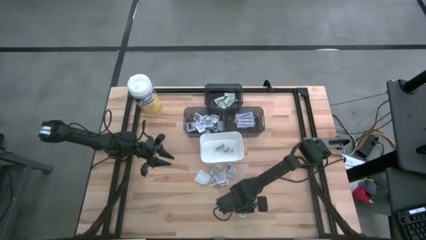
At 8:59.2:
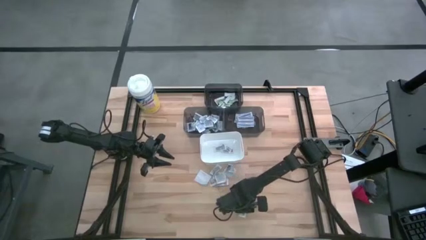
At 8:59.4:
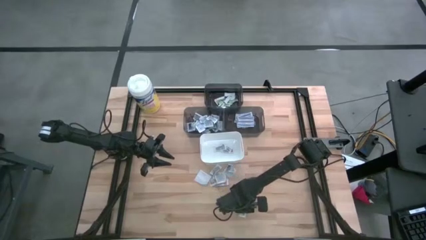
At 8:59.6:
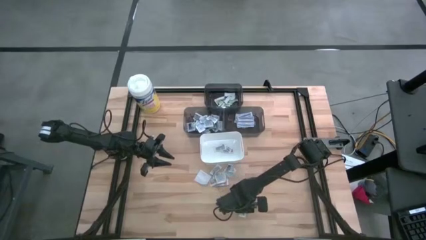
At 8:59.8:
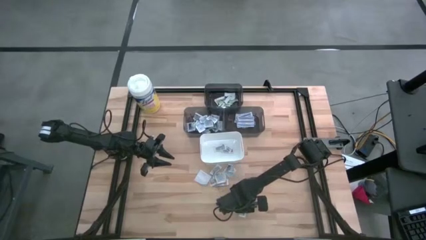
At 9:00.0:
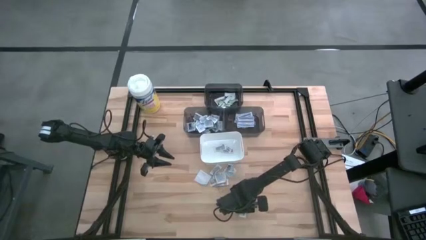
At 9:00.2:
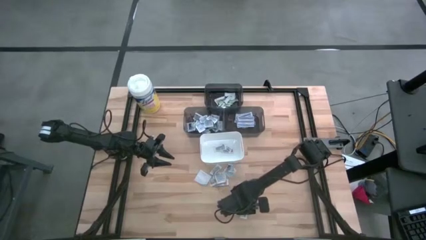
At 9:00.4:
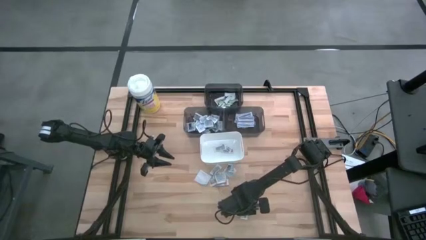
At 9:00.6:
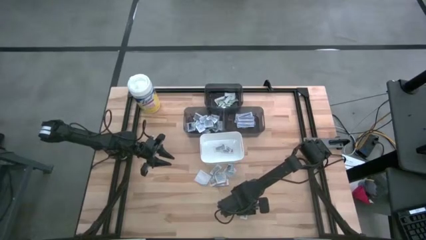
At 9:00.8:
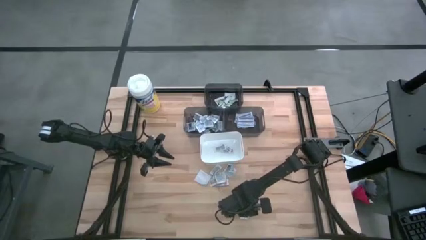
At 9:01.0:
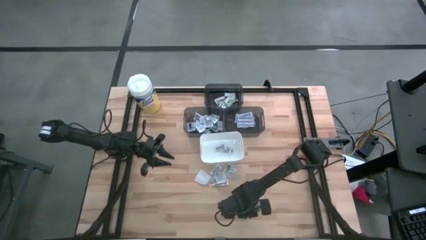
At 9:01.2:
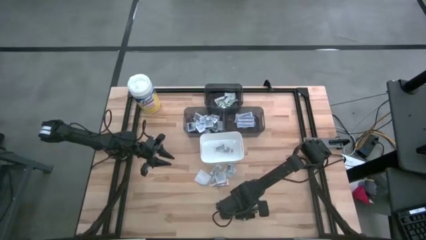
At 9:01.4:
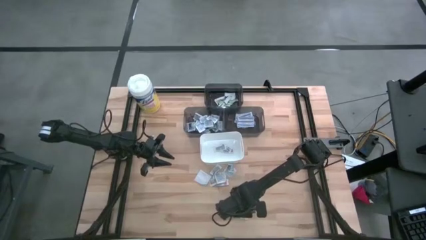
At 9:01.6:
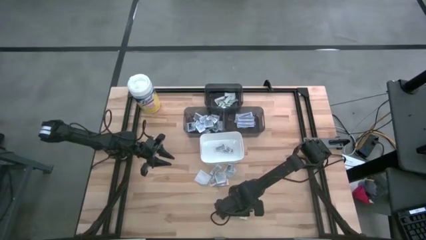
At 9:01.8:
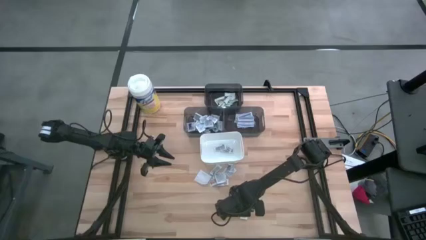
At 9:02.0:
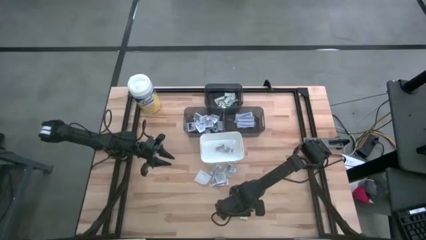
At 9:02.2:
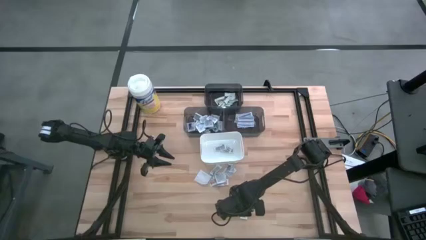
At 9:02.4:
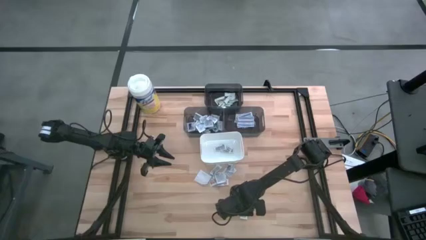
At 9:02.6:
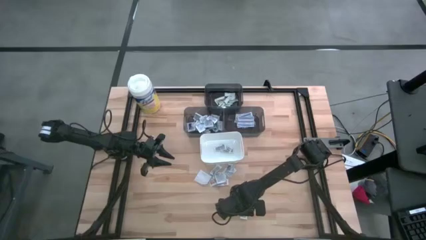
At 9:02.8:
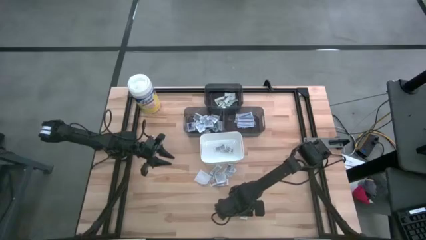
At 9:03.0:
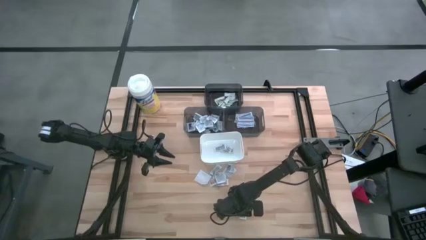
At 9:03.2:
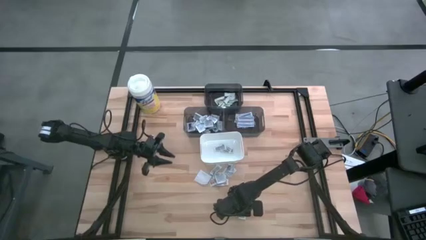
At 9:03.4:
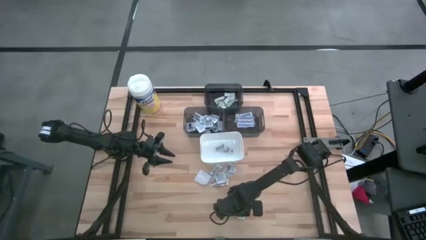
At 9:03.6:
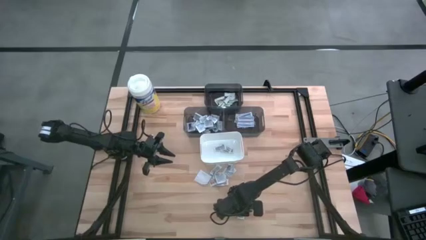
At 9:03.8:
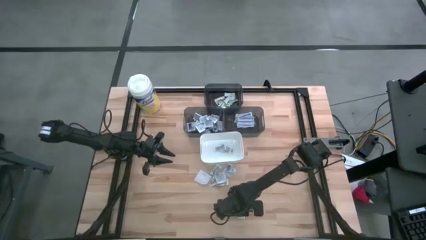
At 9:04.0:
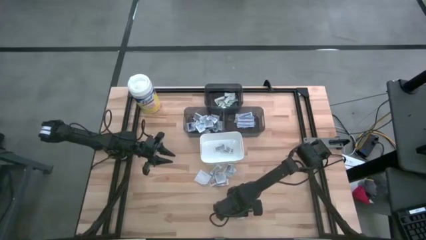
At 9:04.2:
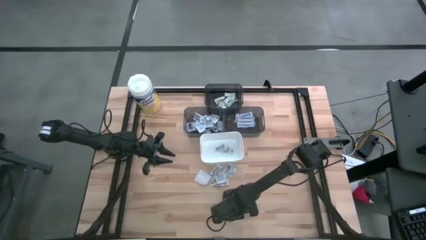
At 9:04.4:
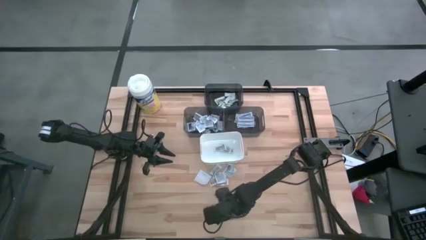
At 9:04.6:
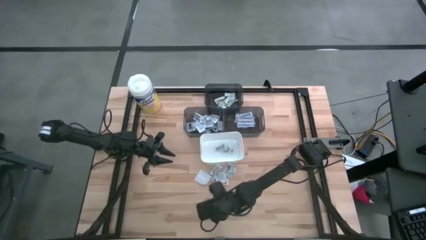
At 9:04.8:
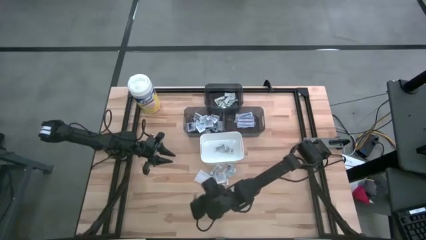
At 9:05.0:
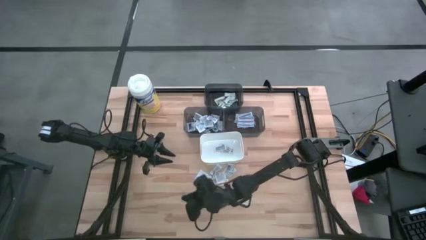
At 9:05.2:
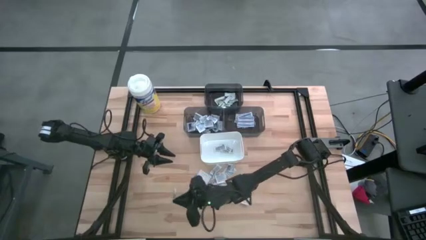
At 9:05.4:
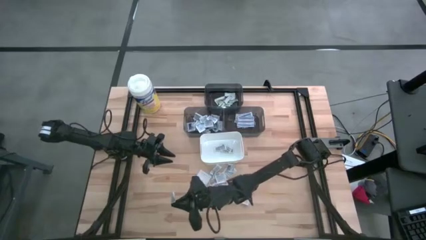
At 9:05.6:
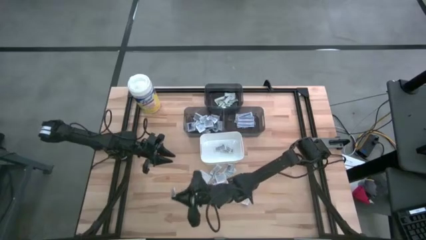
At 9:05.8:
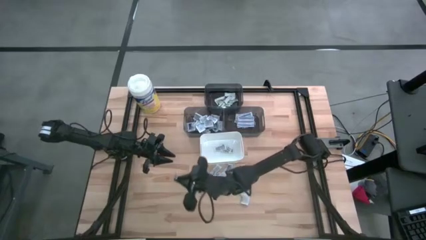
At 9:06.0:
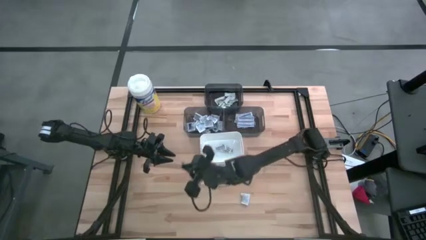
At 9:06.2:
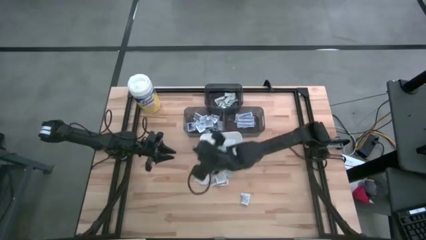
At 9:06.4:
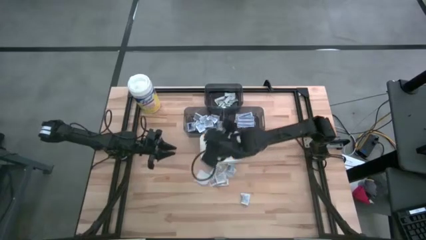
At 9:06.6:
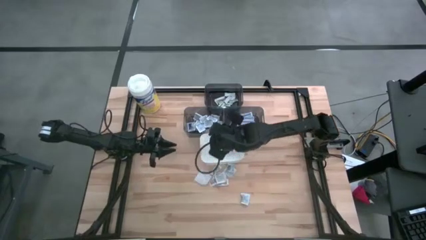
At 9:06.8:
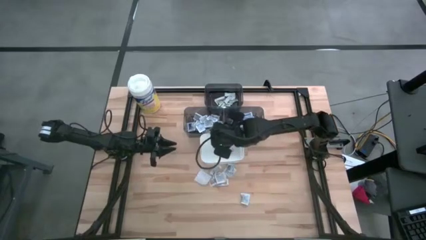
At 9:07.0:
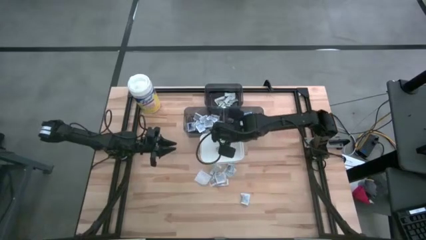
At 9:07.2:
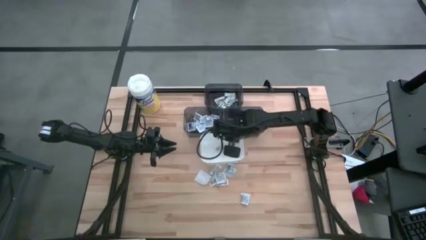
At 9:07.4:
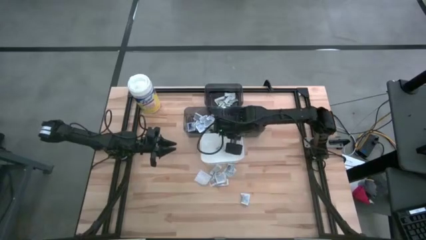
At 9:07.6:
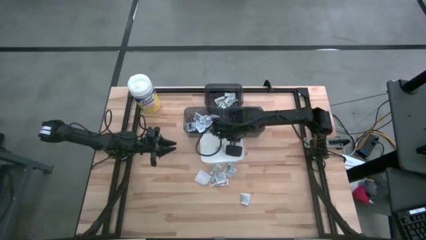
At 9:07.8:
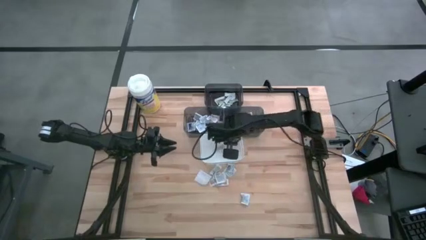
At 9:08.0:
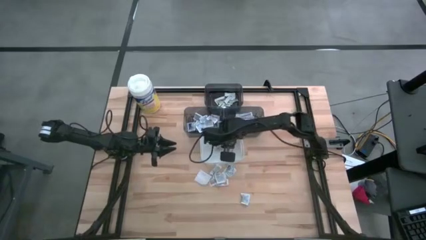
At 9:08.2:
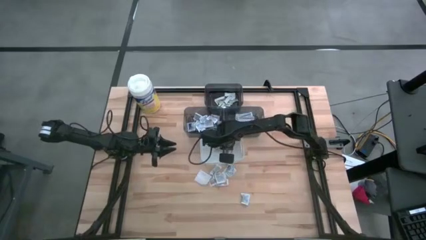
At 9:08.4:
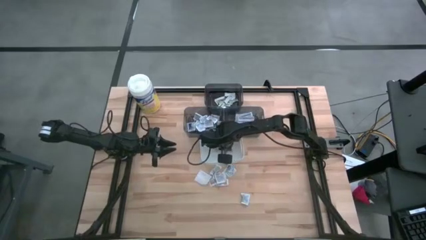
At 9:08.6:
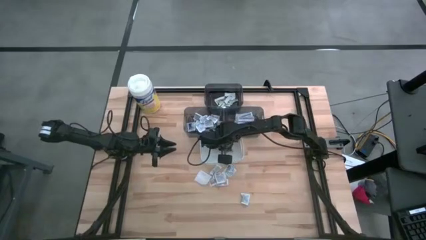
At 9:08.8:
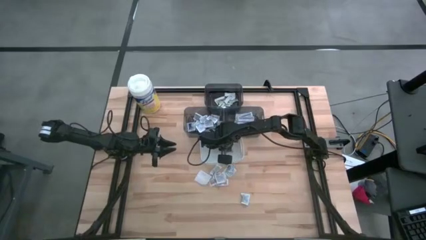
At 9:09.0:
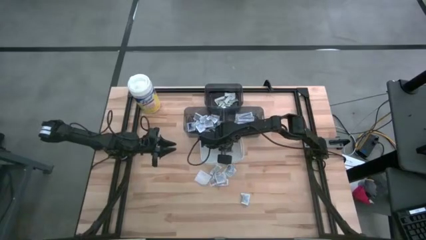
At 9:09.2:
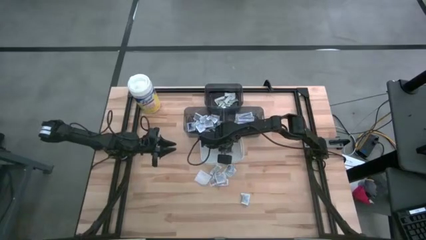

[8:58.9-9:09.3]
Task: Pick & Place First Aid Supplies
Put the ointment pack into the white bin

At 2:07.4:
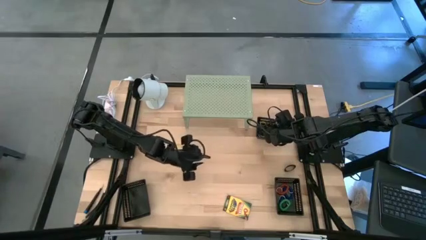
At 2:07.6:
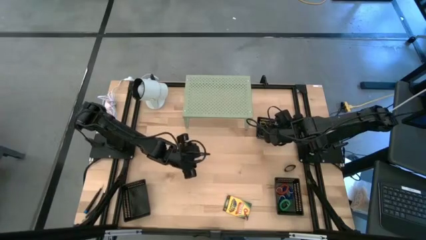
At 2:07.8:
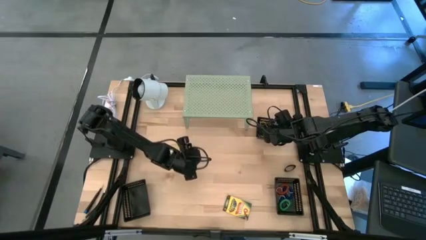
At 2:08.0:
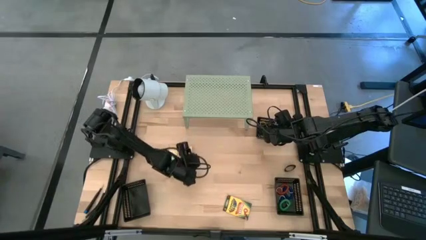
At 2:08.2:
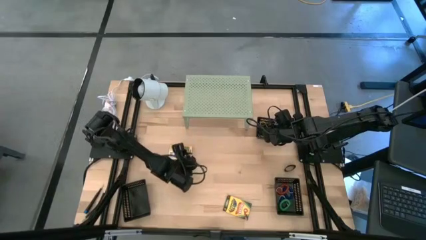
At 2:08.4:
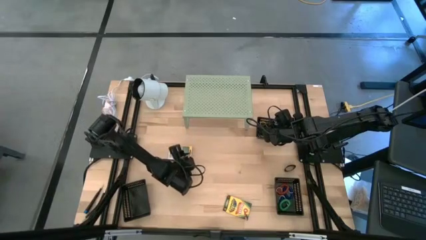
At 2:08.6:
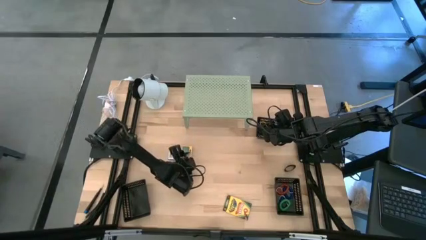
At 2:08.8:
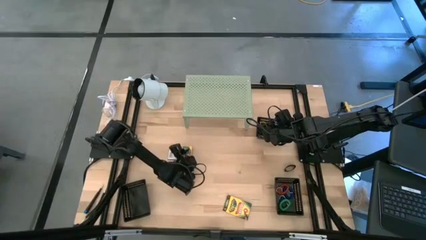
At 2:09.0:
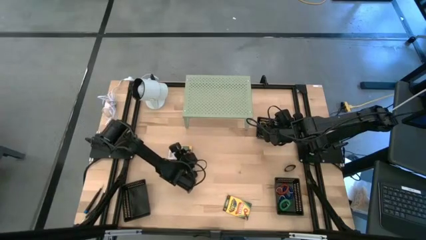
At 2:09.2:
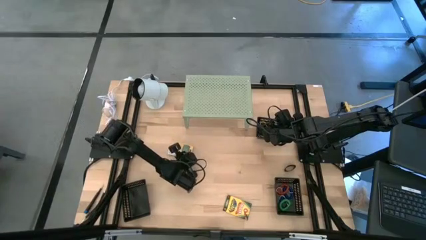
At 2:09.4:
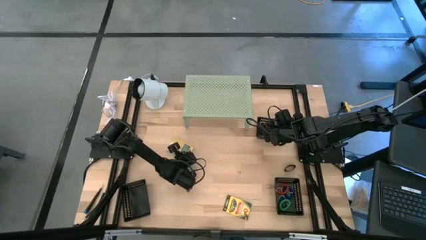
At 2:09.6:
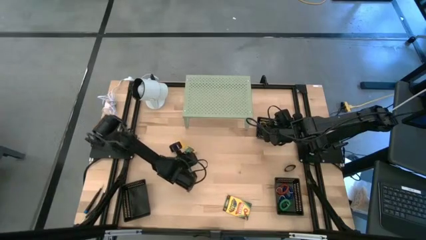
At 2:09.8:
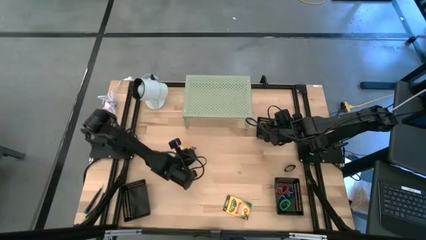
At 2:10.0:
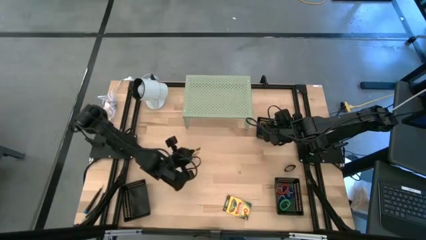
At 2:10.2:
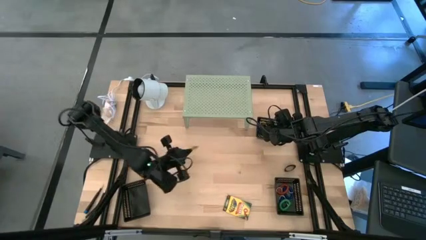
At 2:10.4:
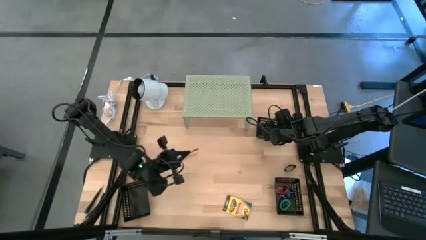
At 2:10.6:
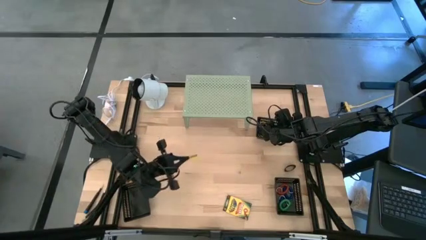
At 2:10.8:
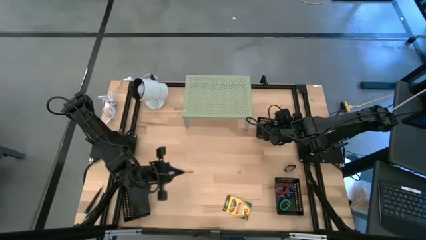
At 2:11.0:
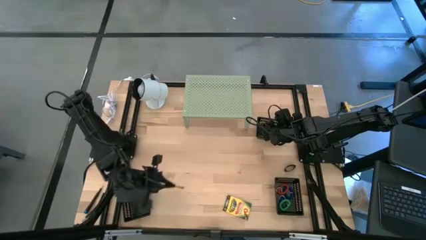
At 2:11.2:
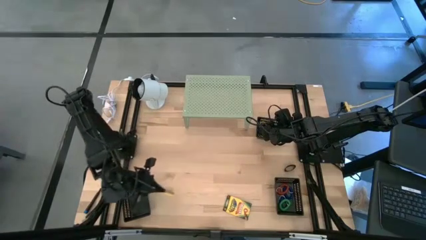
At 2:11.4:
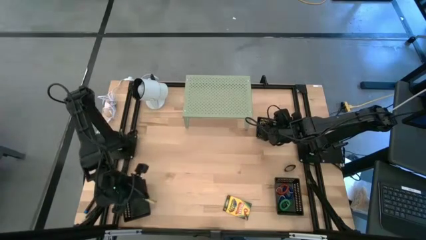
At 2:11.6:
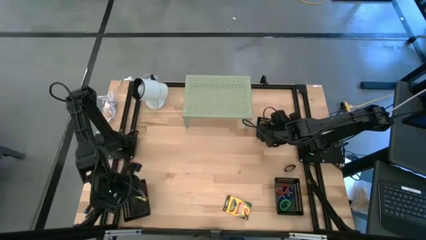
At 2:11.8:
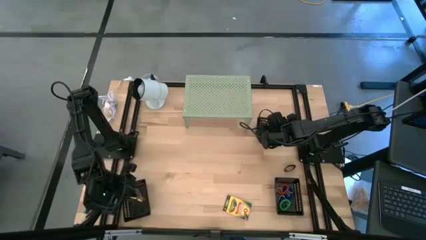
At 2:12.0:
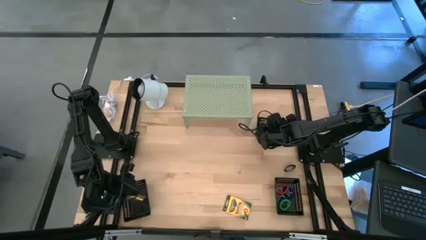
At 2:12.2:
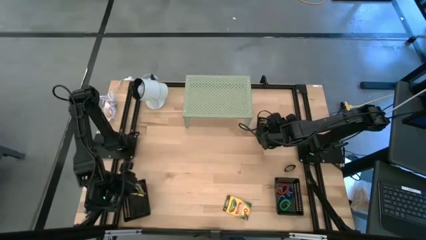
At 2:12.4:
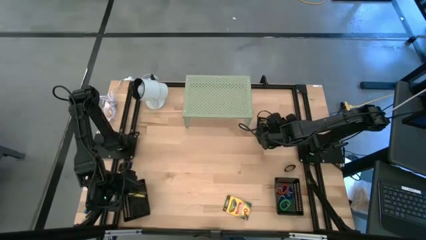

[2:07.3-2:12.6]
Task: Pick & Place Office Desk Supplies
Put the crayon box into the bottom left black bin

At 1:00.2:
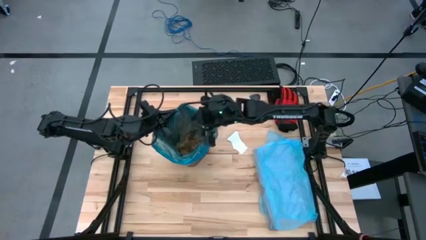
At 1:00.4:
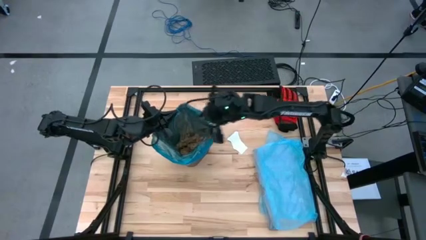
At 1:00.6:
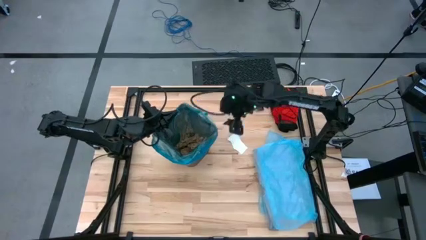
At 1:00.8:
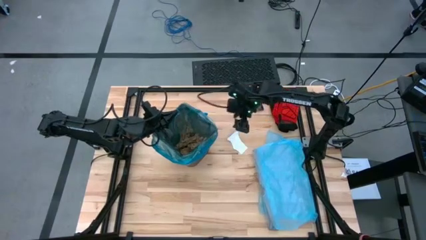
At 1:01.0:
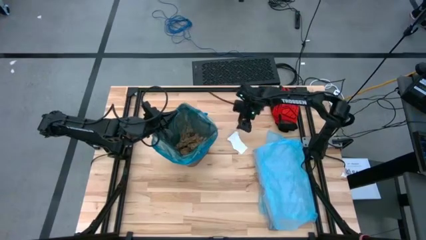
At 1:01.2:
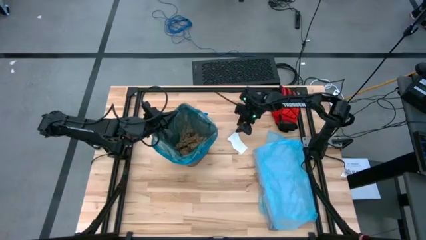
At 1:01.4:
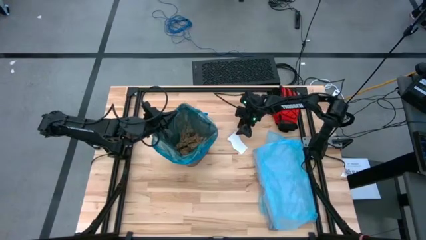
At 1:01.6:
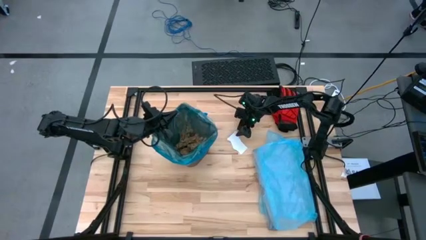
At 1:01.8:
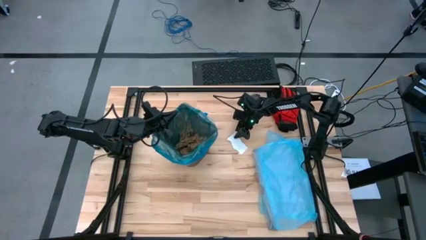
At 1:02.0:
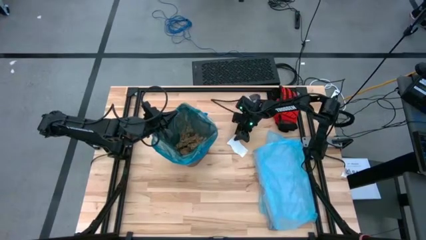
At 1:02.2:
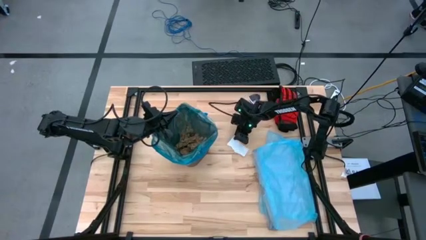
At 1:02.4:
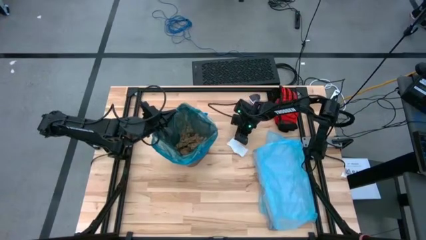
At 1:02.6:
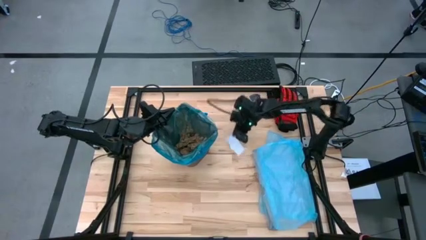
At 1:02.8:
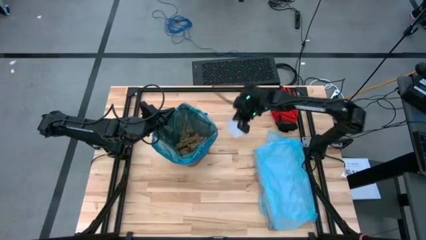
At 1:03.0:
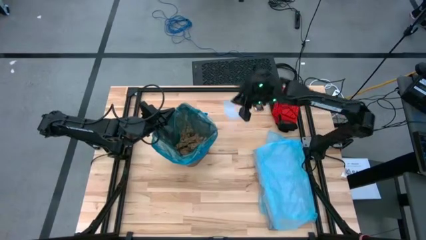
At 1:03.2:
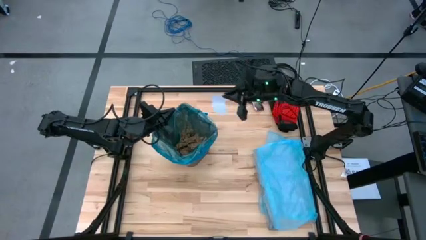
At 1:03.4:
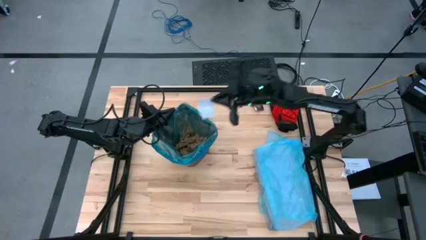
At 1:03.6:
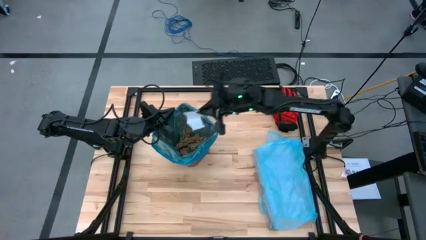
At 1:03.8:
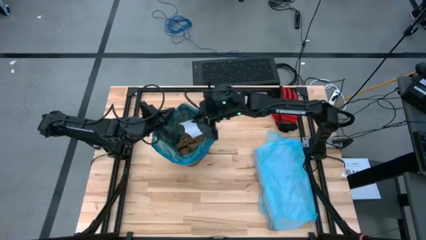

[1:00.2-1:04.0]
Task: place trash/remove bag and relplace
Put the white paper into the trash bin
